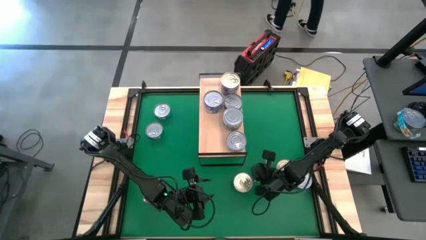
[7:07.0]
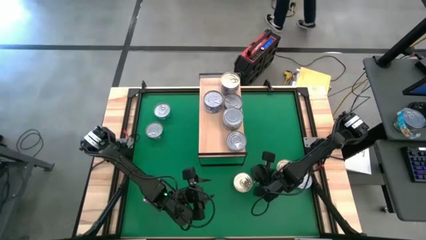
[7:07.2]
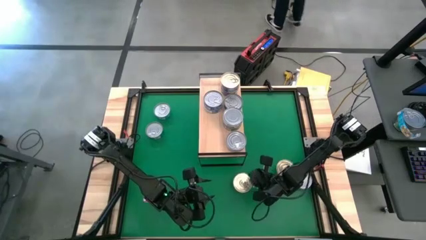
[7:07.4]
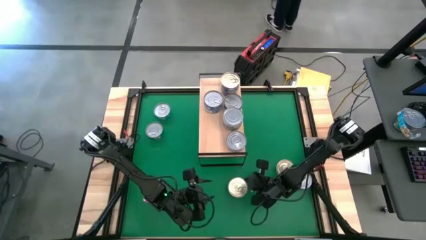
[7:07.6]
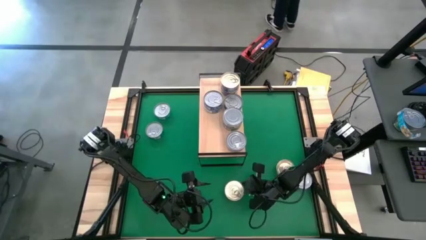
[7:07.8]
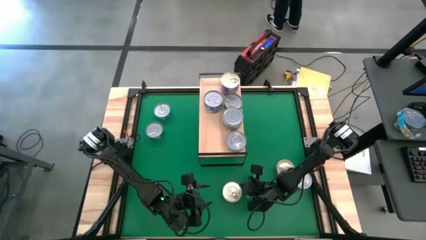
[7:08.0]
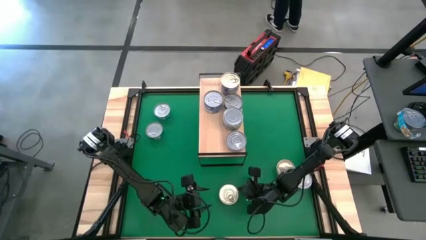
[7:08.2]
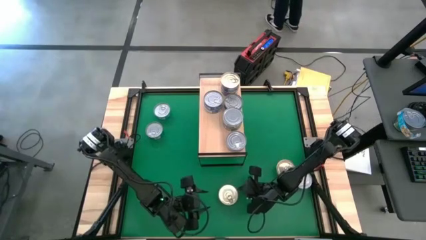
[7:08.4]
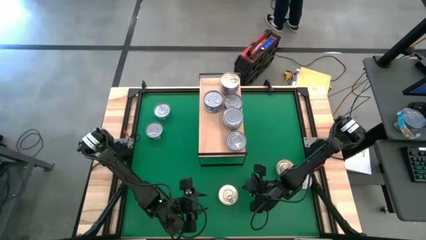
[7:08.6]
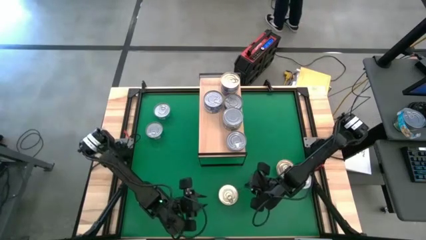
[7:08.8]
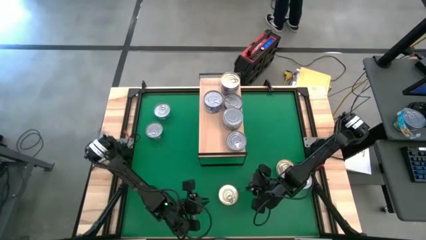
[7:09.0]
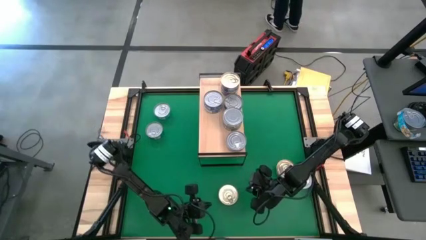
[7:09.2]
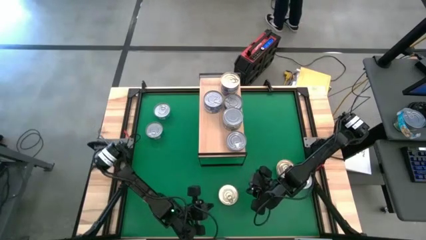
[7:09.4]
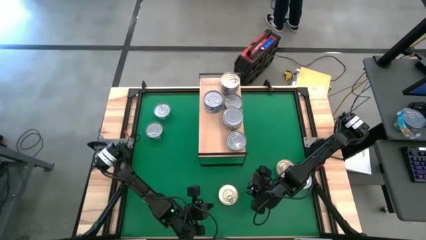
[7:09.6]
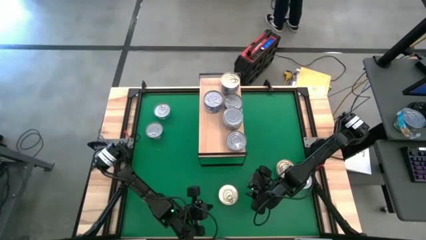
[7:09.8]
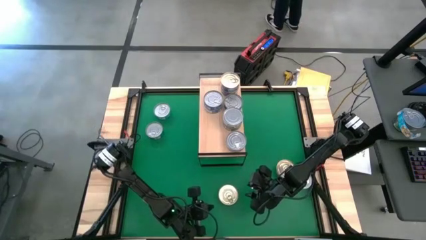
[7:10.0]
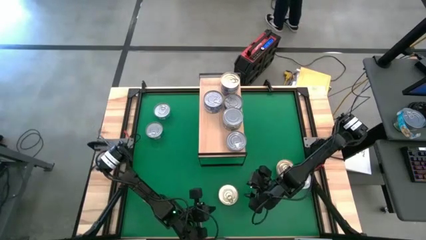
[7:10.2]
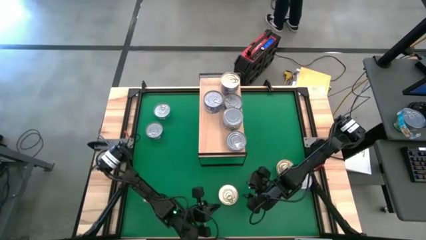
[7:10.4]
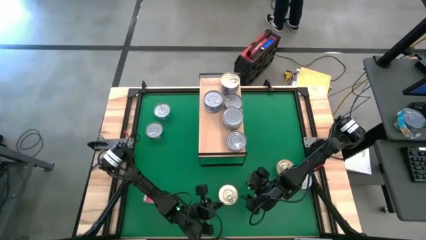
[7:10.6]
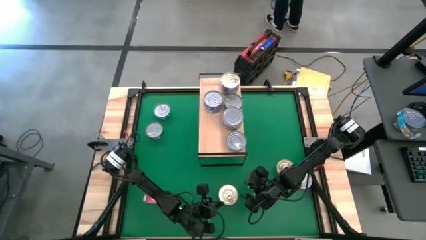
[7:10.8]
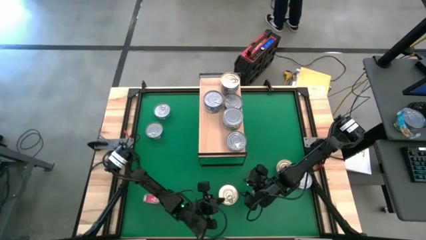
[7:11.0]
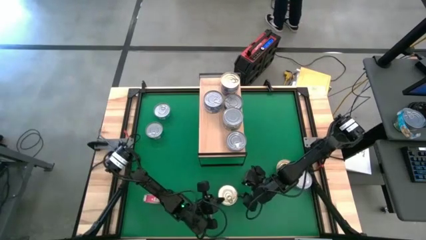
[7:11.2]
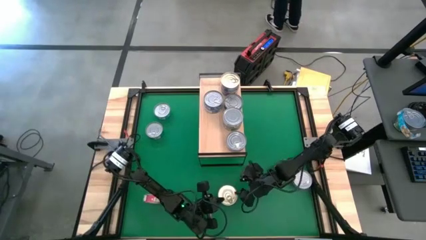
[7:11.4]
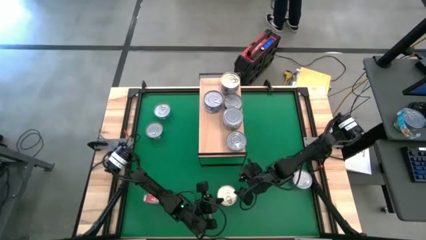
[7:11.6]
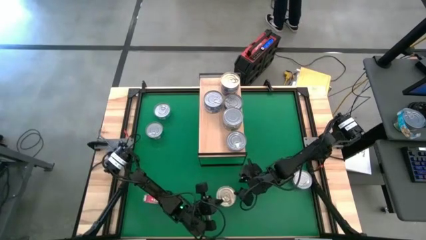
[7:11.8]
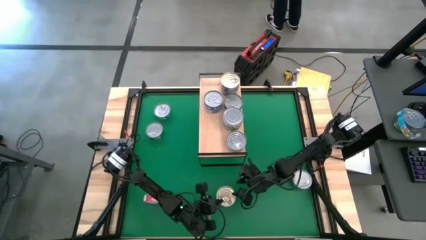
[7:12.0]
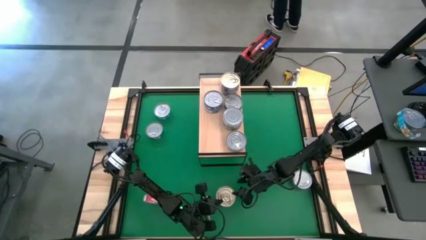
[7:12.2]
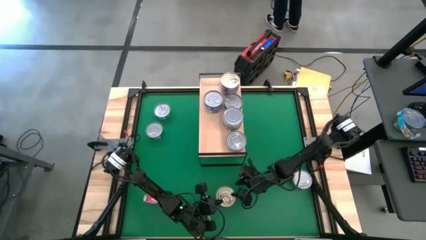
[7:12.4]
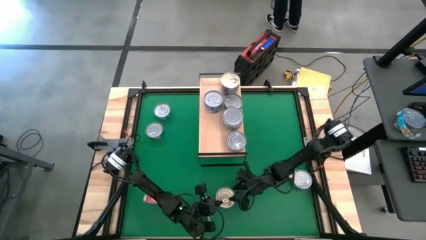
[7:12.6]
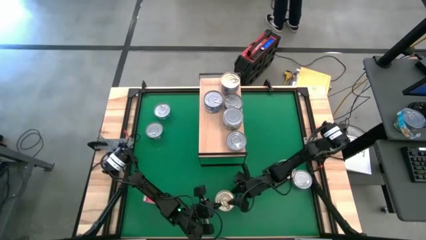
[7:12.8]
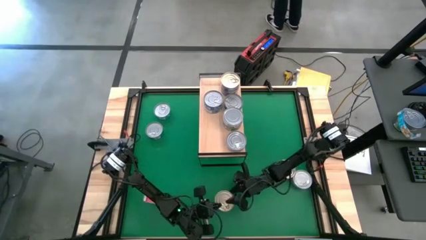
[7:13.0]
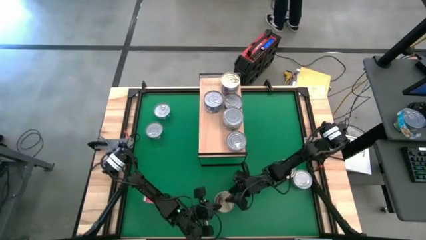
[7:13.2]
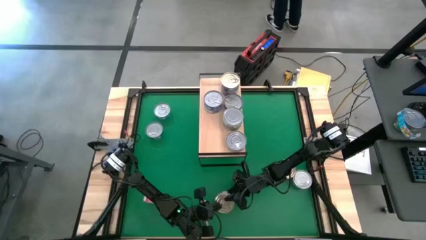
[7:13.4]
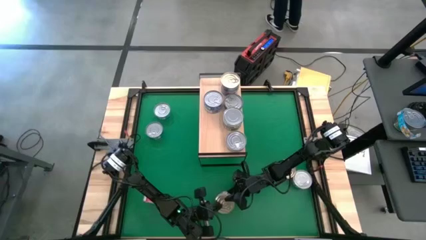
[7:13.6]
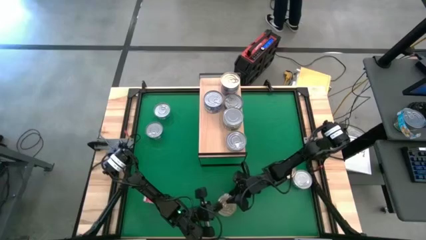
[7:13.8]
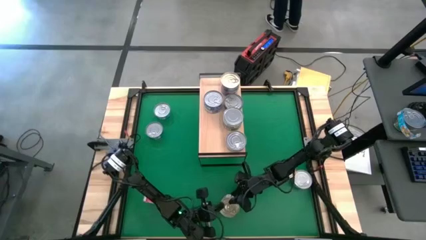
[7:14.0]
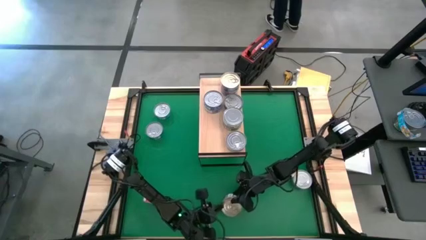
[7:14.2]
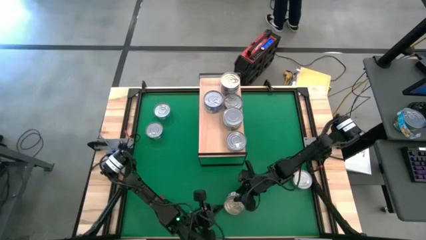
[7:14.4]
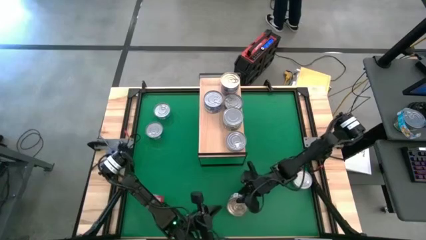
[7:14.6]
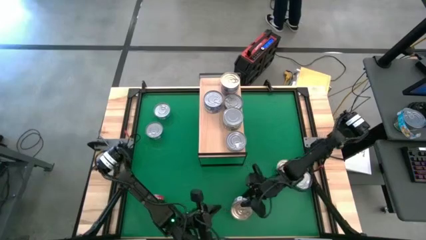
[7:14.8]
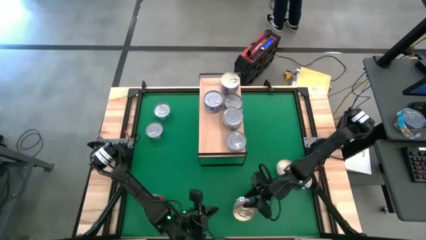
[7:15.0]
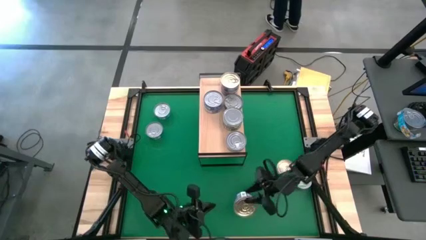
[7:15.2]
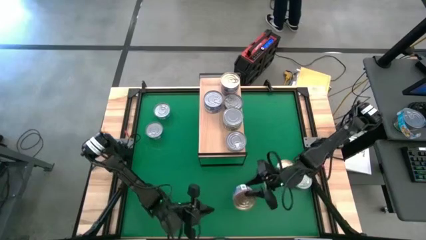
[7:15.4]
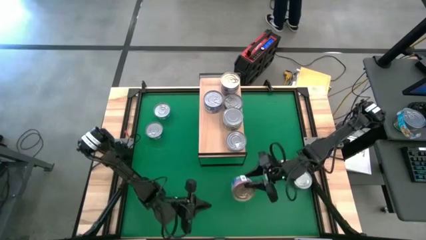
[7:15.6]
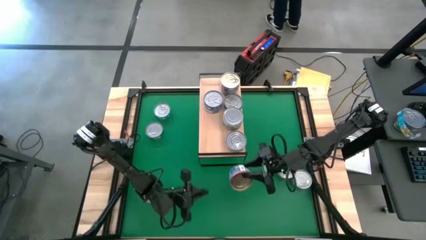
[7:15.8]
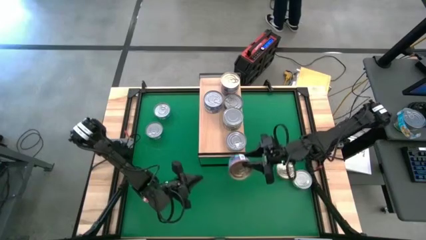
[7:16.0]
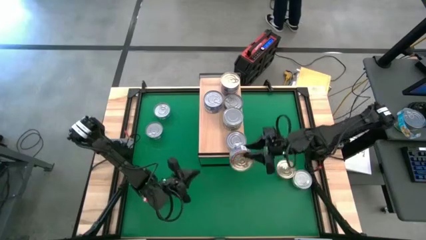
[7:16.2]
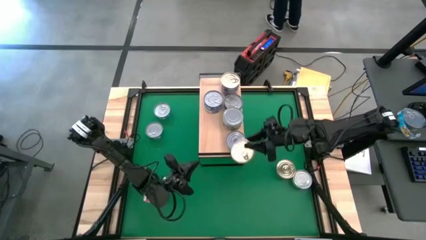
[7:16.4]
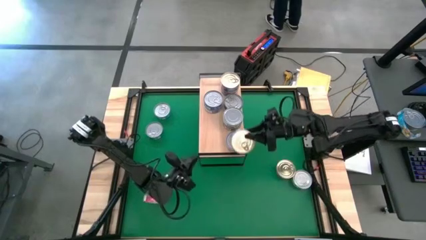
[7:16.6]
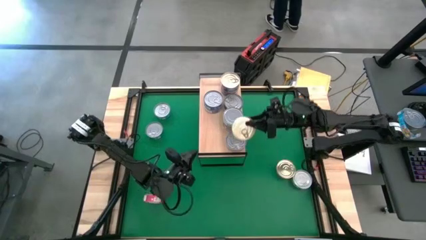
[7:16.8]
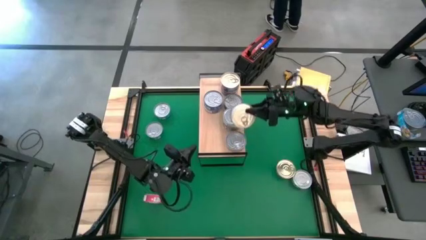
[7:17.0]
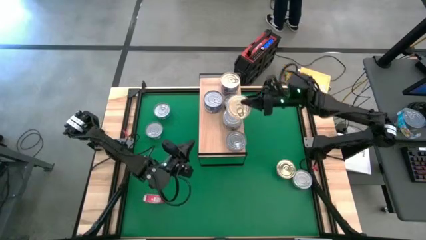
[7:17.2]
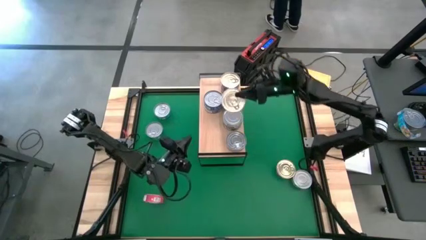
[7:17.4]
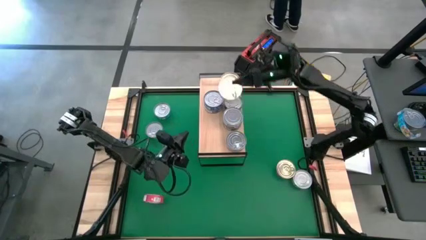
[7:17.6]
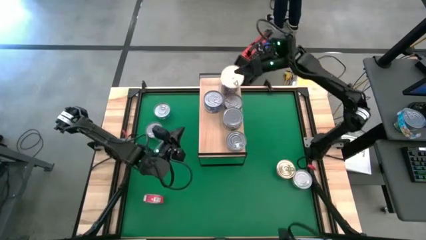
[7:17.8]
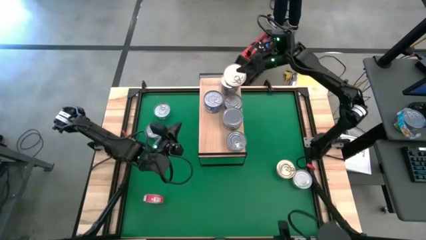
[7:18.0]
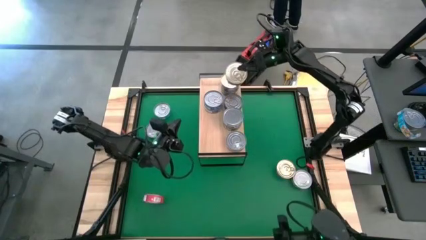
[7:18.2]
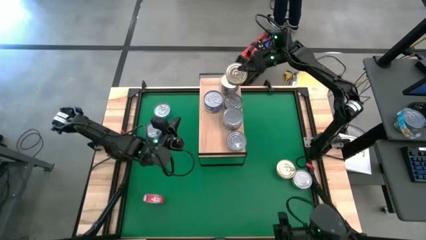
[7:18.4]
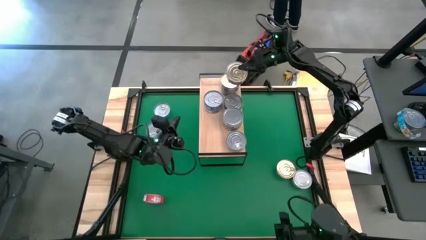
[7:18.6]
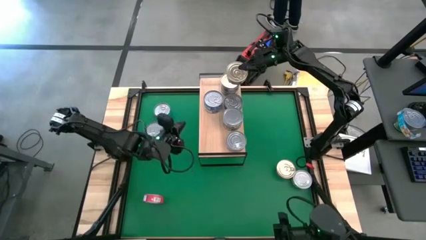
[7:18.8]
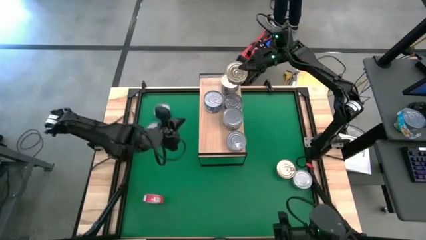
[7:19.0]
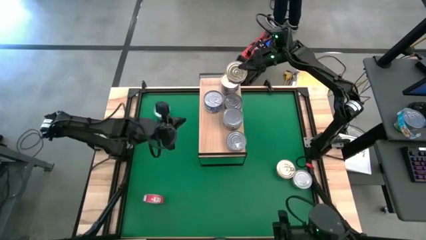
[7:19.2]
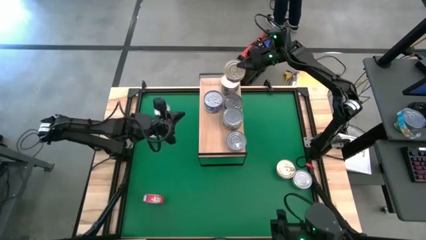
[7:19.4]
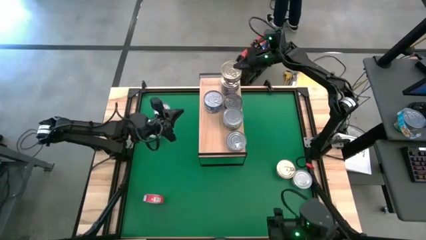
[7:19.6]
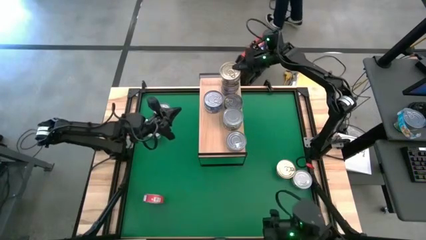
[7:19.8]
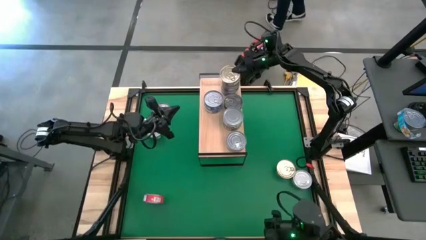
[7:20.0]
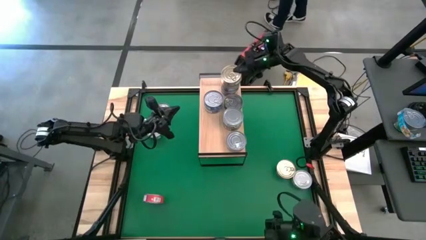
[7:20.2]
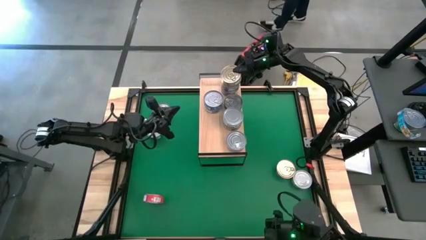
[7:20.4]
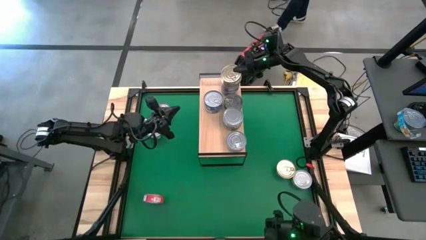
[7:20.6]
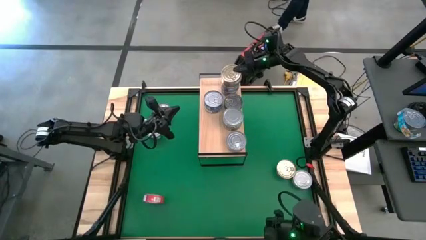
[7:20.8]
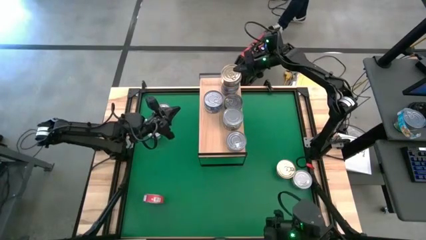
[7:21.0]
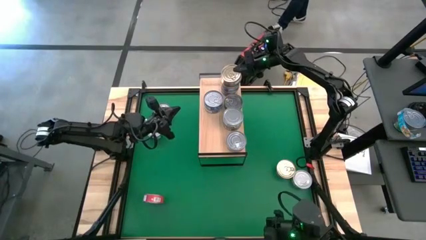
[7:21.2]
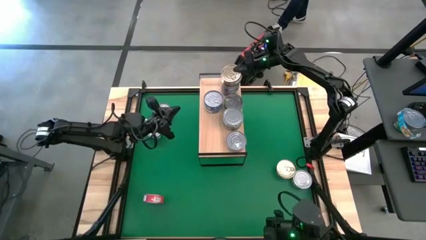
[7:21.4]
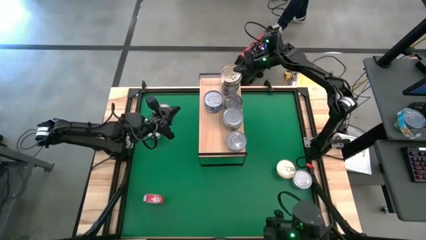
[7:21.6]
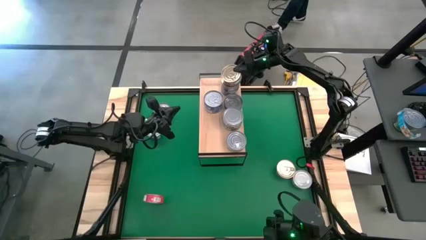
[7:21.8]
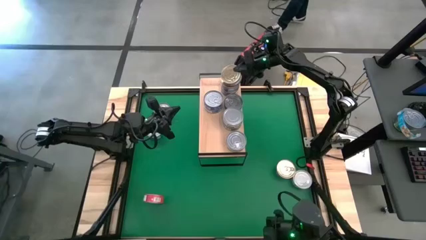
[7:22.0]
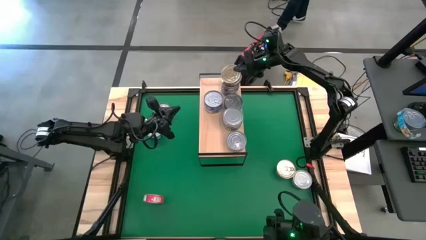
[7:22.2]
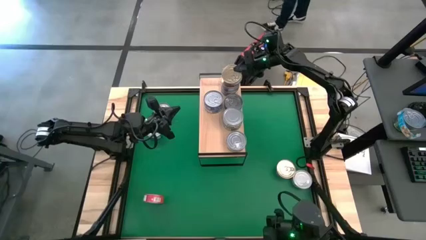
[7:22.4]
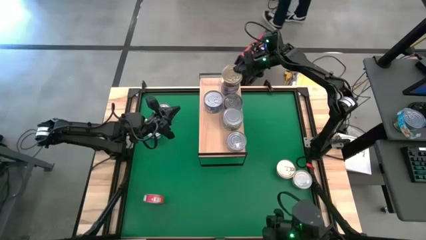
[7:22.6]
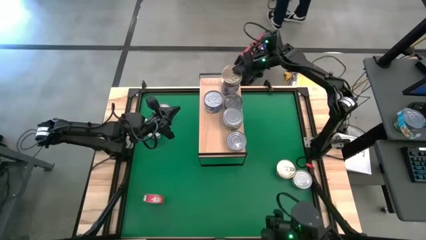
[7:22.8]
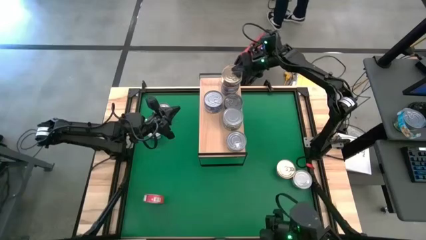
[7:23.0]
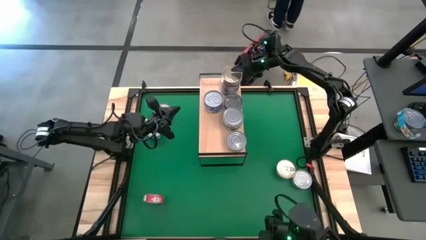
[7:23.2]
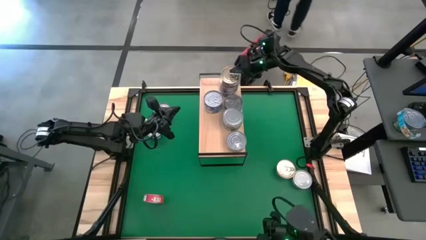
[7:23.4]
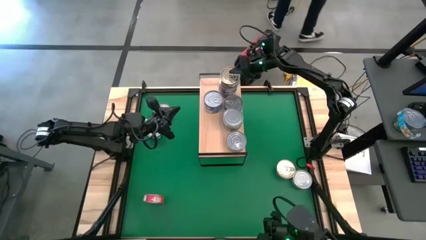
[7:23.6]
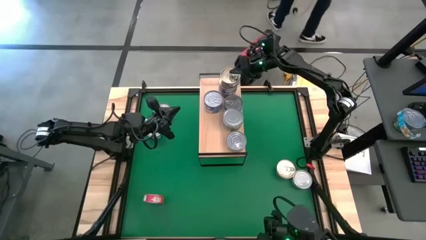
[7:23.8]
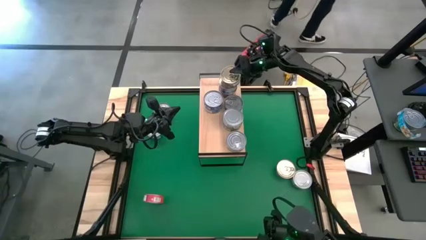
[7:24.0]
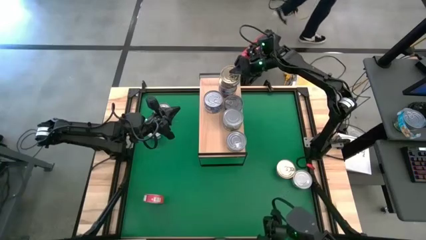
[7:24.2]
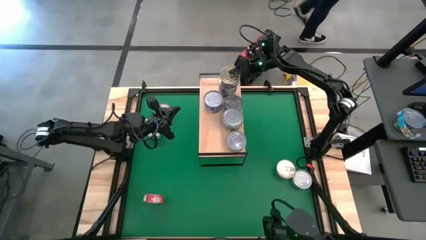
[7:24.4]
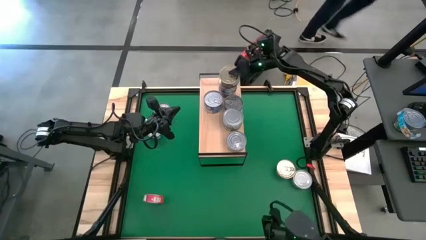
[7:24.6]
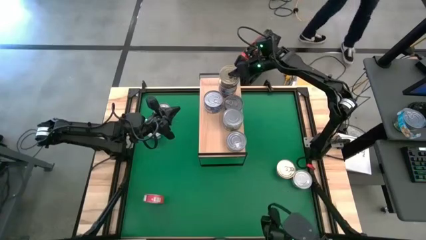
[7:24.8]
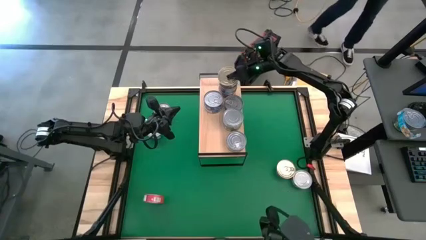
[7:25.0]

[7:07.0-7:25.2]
Task: Stack canned seafood by type on shelf
Stack the top dark blue tuna can on top of the dark blue can on the shelf
